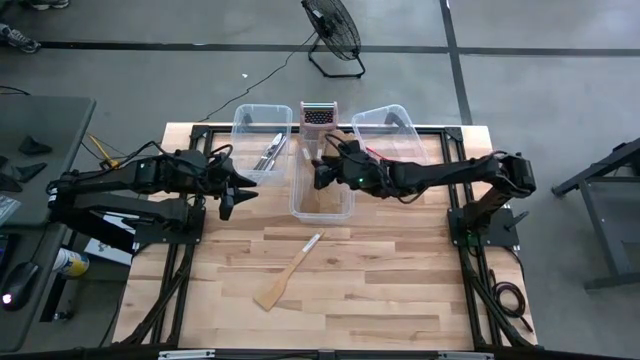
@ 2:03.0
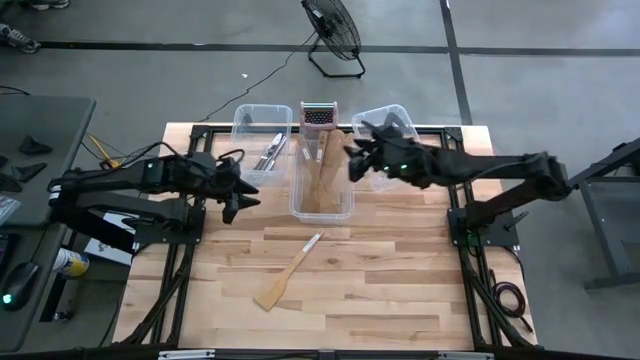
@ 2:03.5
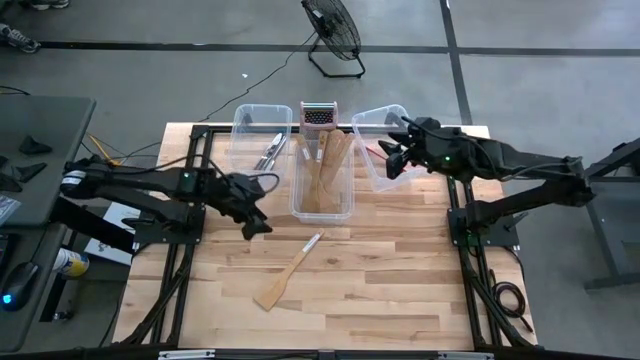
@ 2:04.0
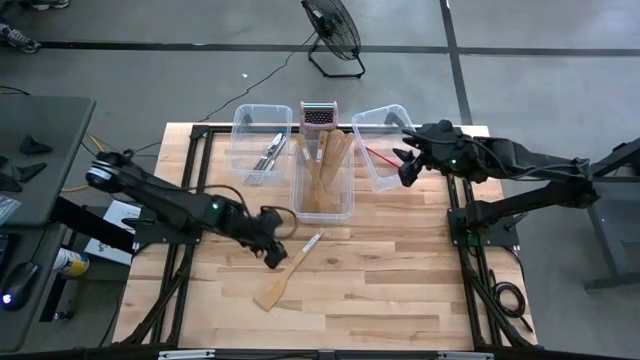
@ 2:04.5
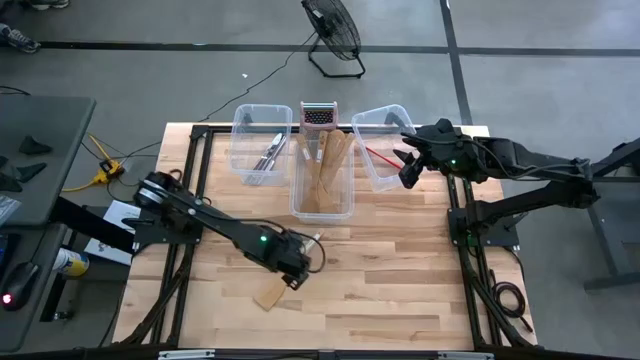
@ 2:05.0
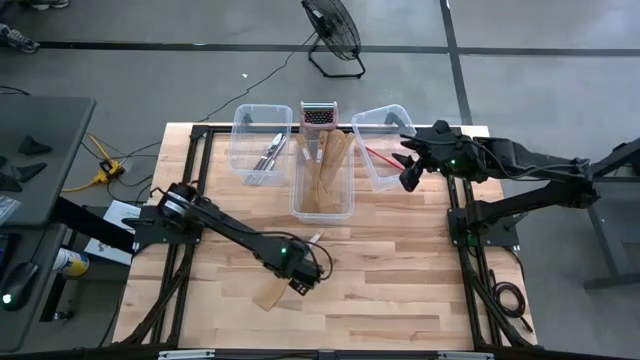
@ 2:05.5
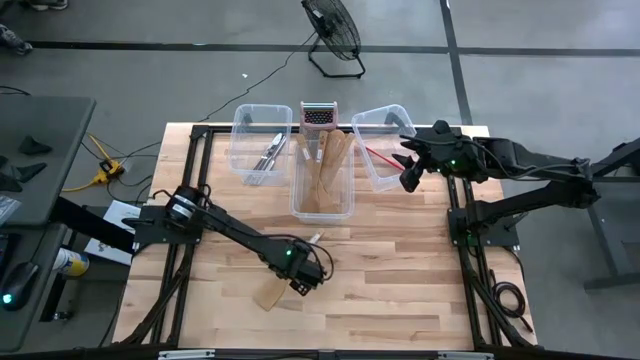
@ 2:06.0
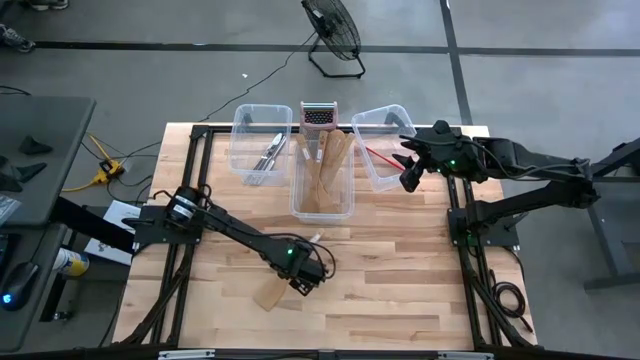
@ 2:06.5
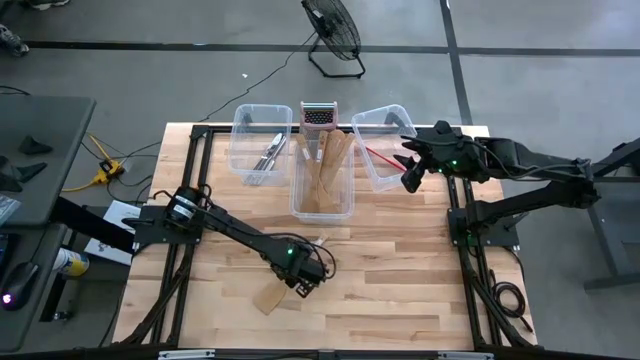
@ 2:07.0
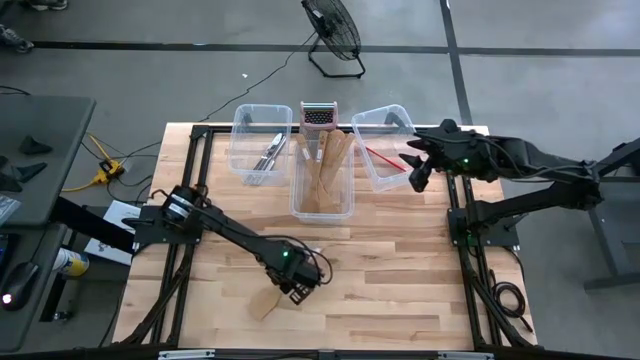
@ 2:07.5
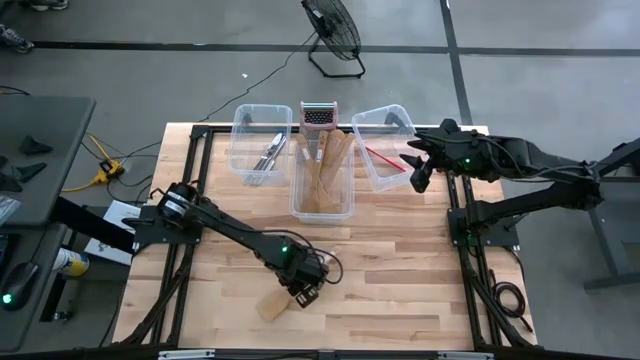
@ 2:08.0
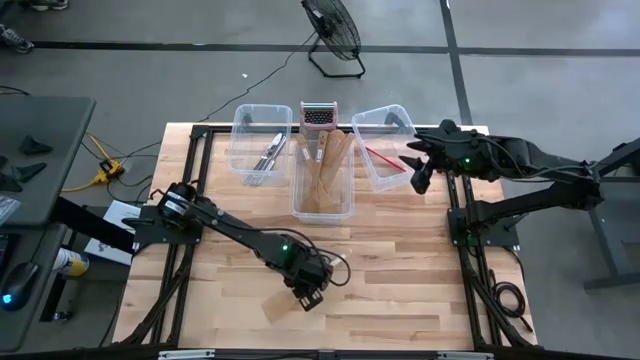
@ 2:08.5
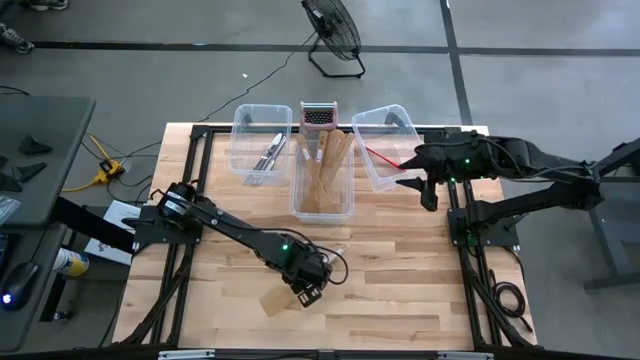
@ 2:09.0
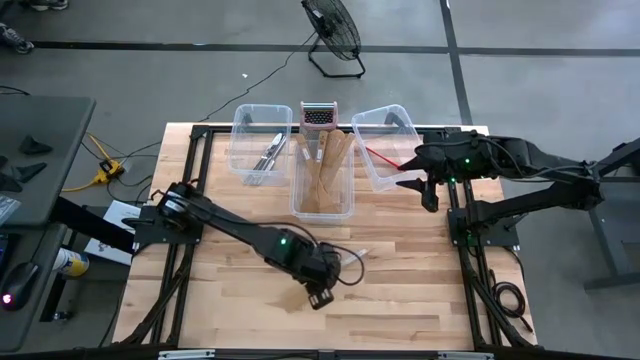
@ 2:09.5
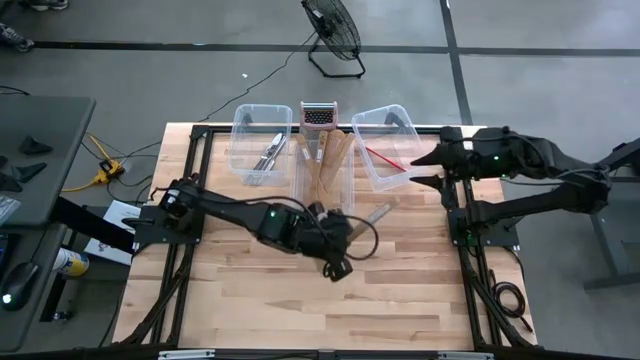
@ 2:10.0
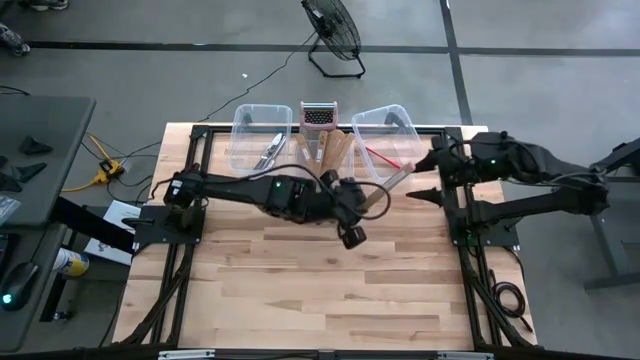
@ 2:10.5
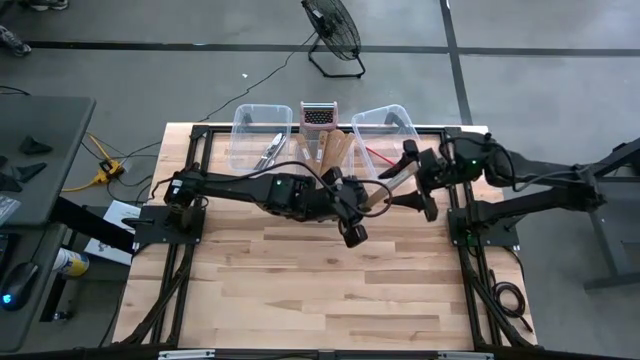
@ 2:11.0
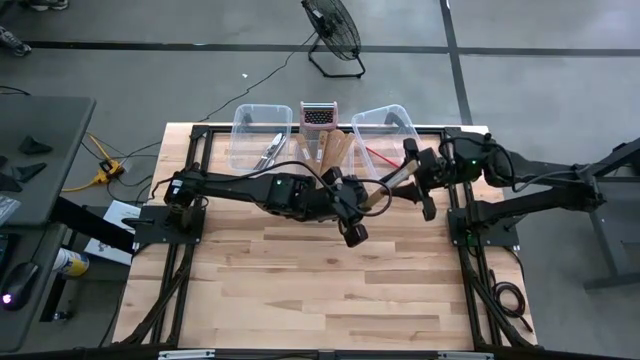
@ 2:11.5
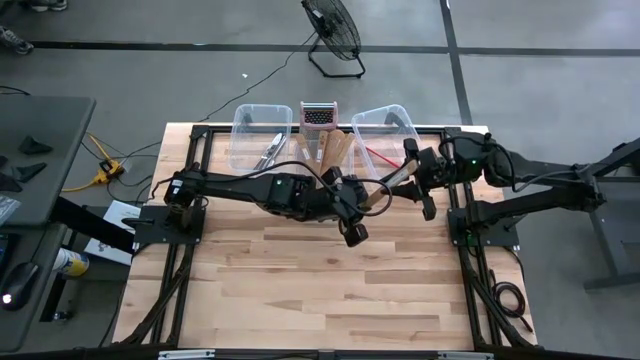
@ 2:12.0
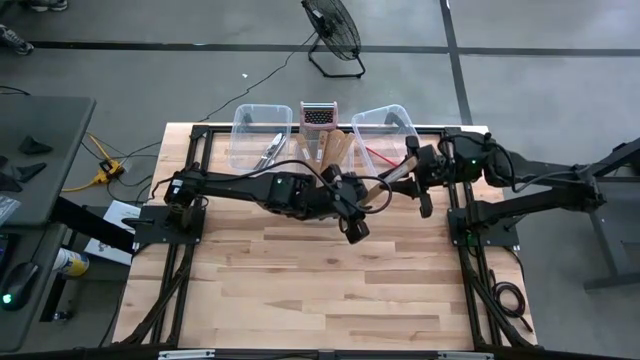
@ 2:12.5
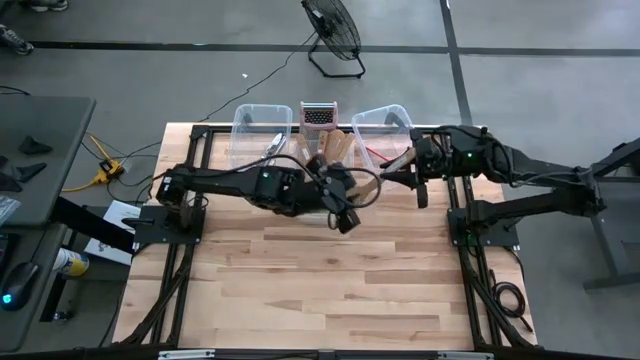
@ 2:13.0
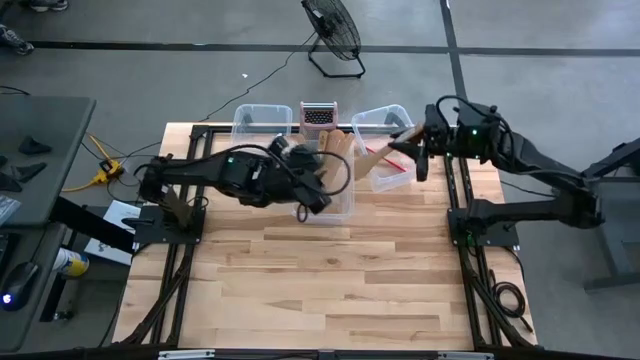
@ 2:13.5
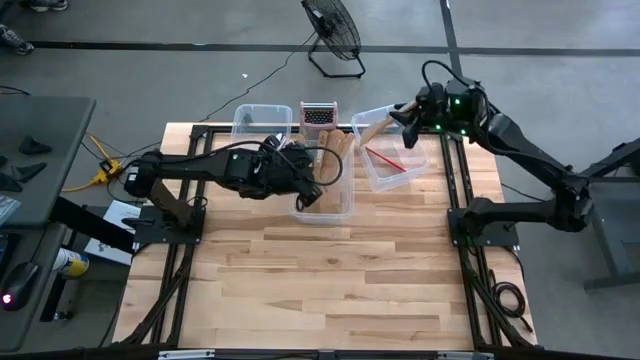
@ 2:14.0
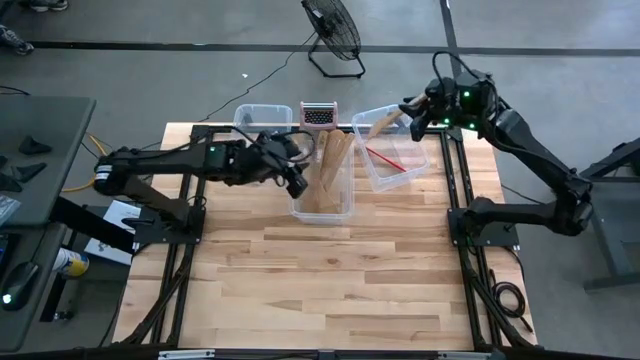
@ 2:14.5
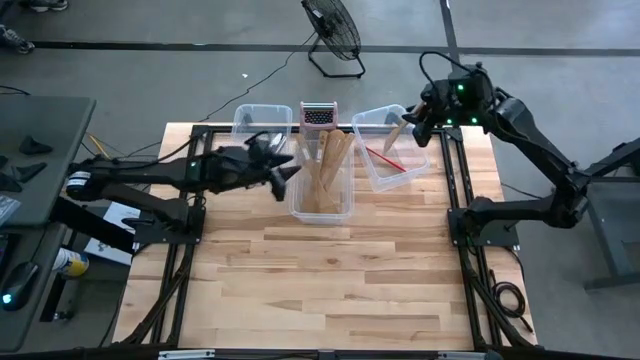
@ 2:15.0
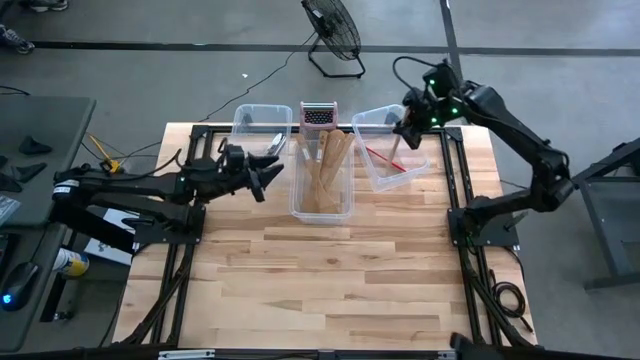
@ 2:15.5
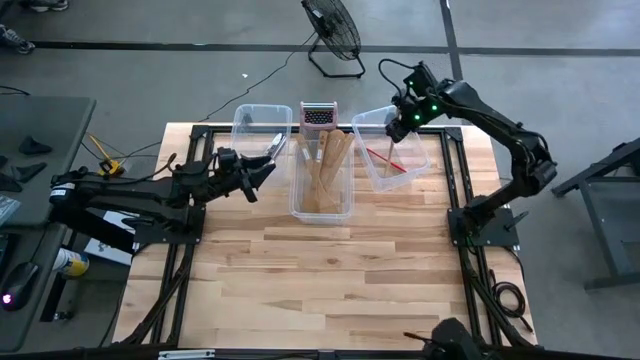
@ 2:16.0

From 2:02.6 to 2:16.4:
Task: Pick & Place Kitchen Items
Put the brown spatula into the right transparent bin

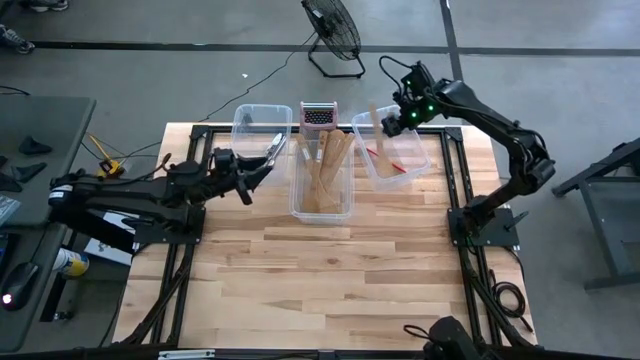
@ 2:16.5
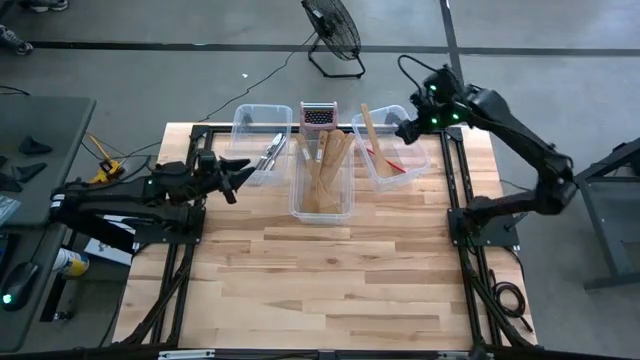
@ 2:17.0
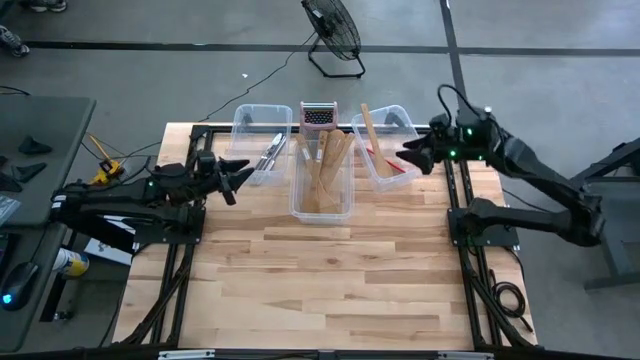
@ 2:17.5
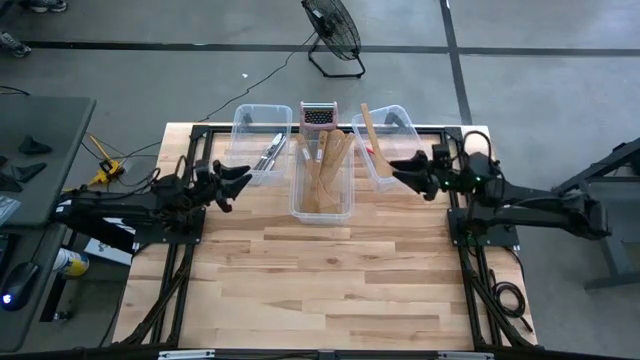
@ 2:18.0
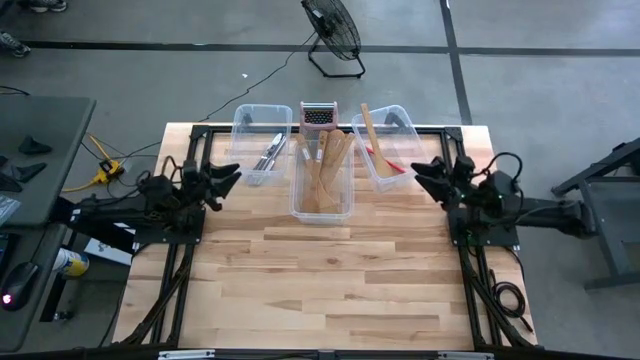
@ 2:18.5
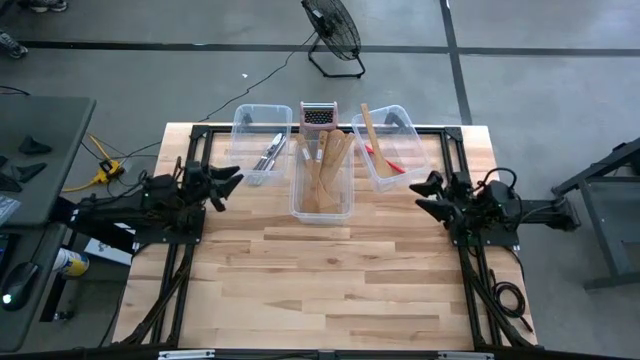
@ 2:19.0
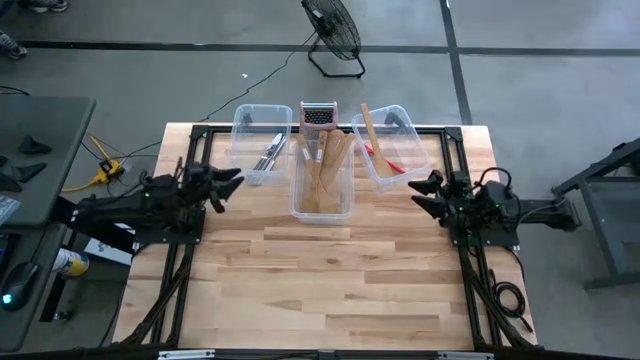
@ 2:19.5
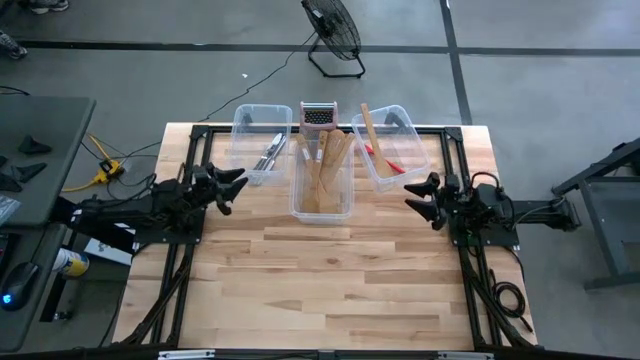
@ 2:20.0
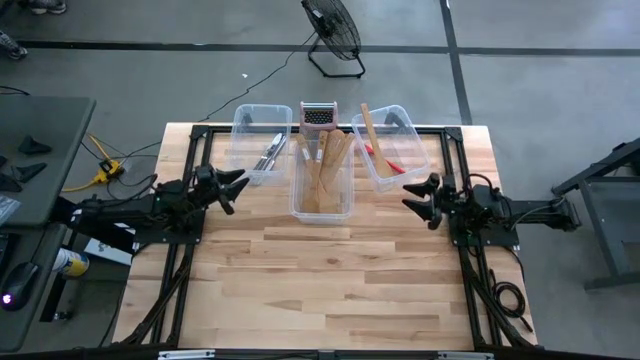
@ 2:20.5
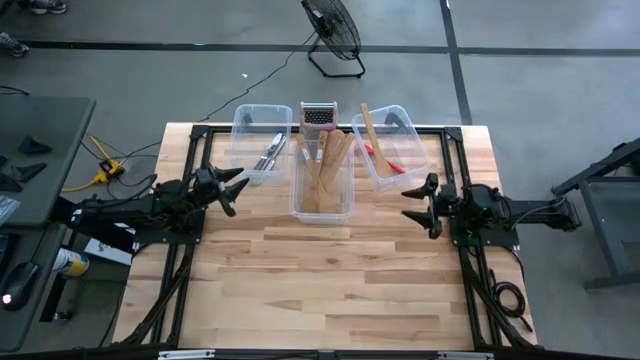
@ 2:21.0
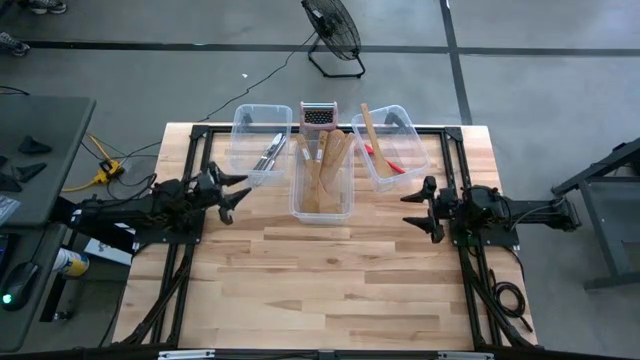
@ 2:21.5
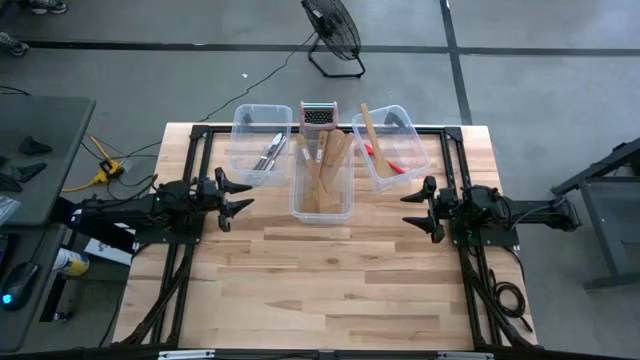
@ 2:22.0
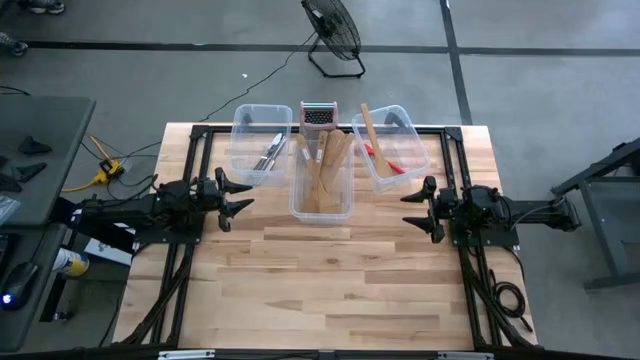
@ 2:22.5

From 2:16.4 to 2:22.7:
Return to Home Position
